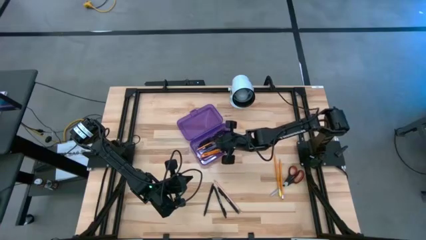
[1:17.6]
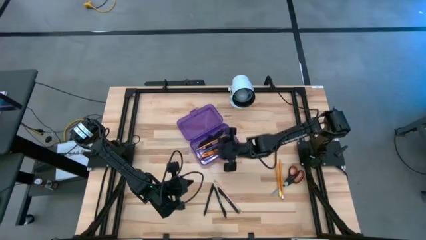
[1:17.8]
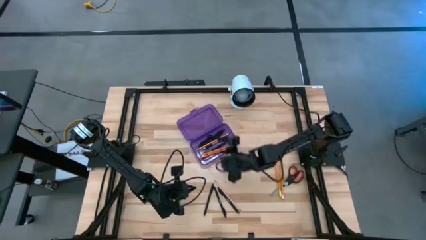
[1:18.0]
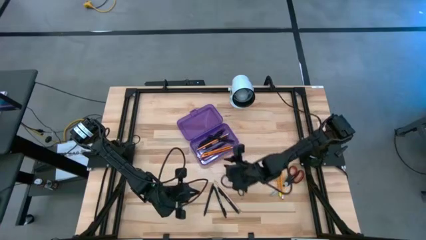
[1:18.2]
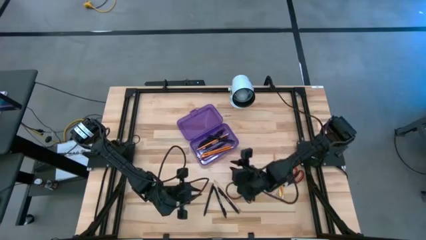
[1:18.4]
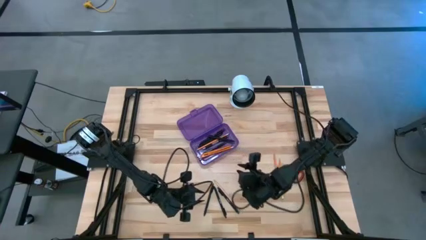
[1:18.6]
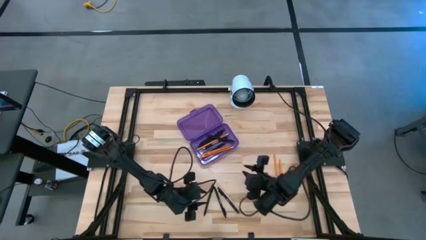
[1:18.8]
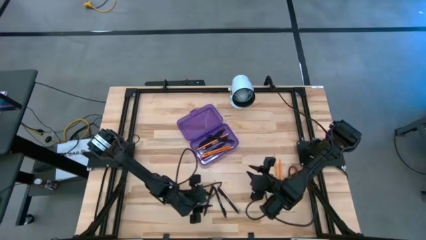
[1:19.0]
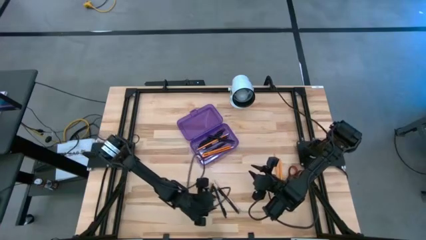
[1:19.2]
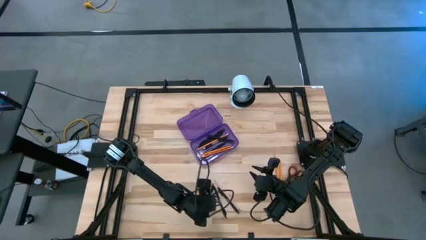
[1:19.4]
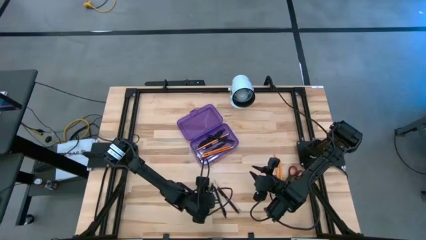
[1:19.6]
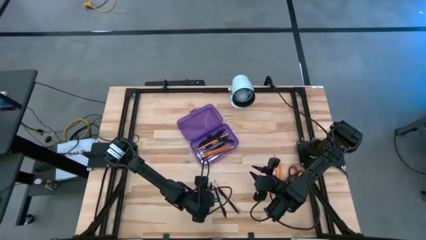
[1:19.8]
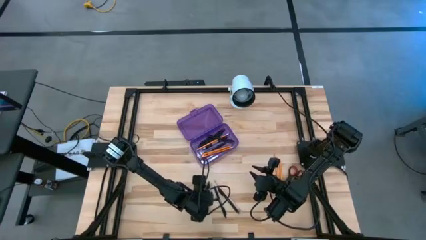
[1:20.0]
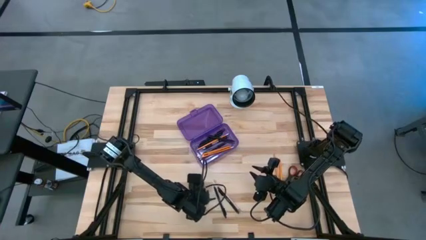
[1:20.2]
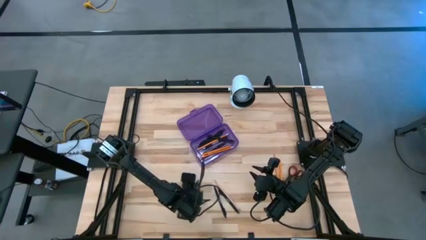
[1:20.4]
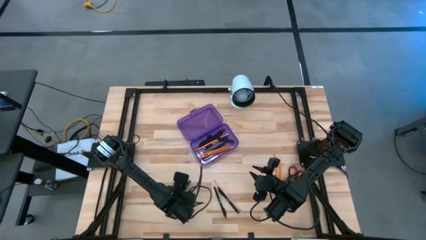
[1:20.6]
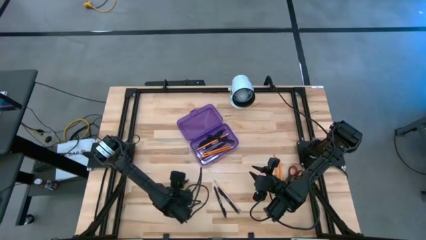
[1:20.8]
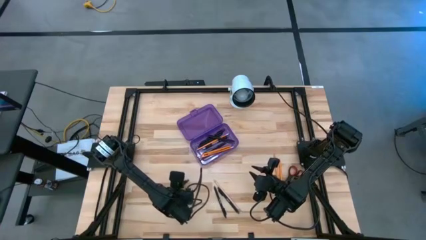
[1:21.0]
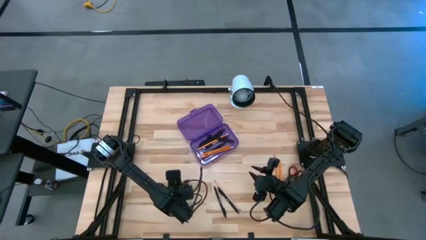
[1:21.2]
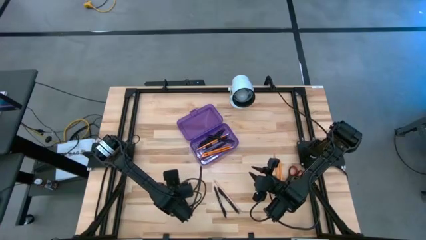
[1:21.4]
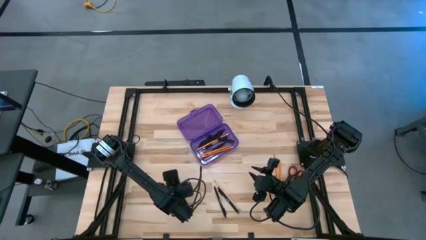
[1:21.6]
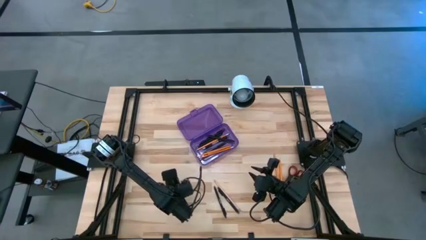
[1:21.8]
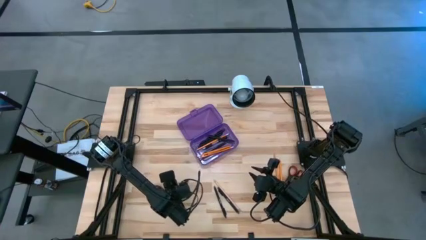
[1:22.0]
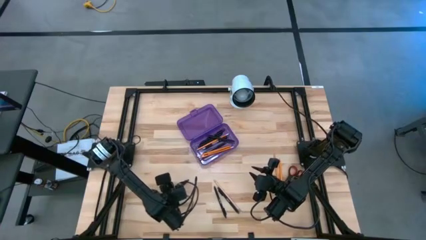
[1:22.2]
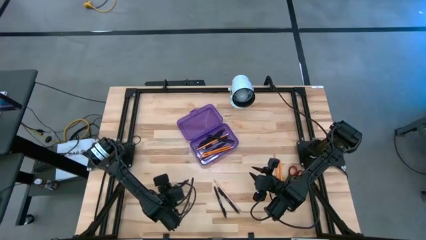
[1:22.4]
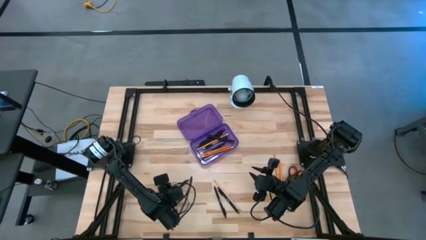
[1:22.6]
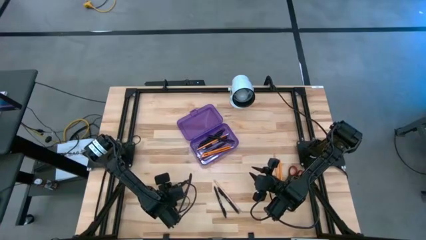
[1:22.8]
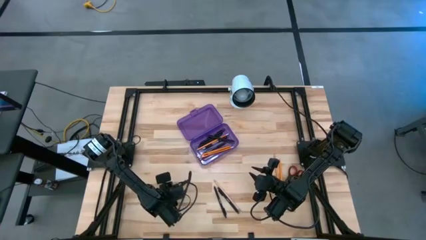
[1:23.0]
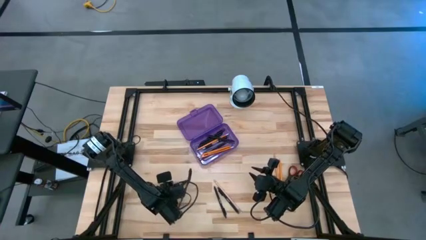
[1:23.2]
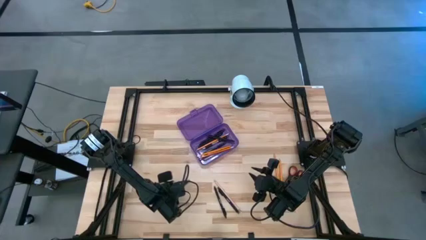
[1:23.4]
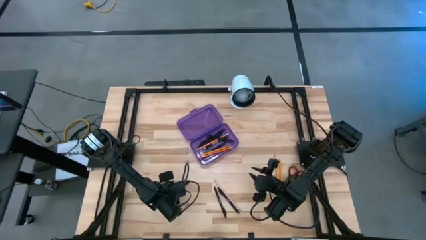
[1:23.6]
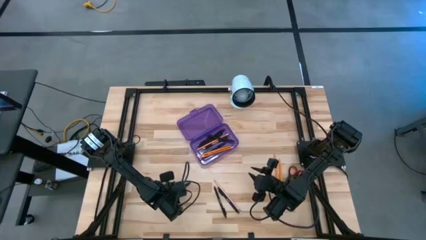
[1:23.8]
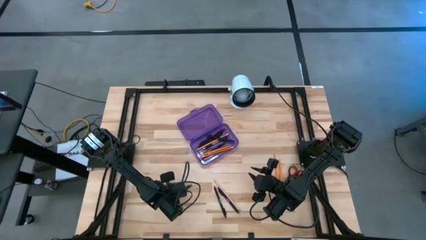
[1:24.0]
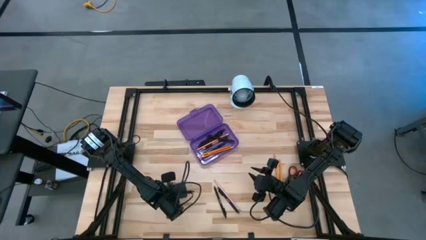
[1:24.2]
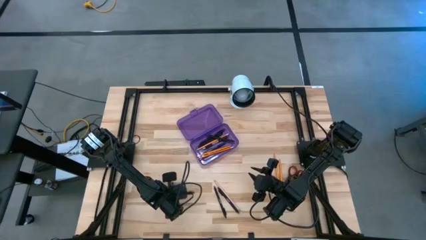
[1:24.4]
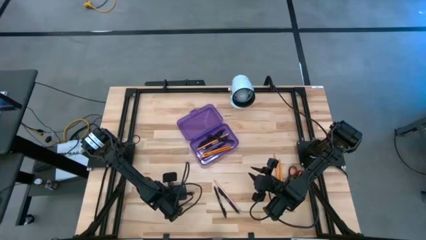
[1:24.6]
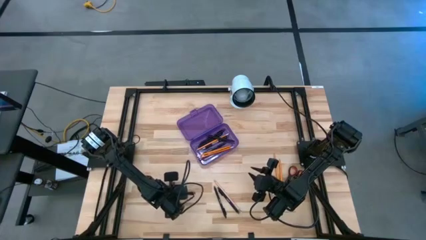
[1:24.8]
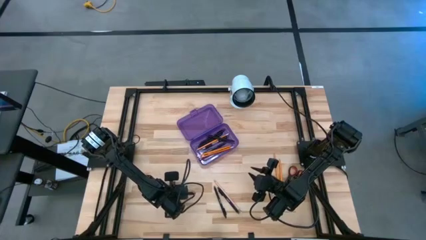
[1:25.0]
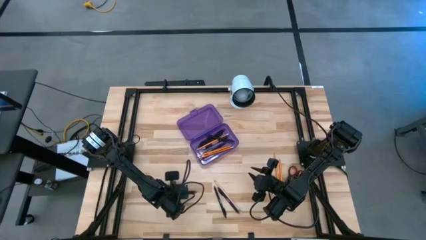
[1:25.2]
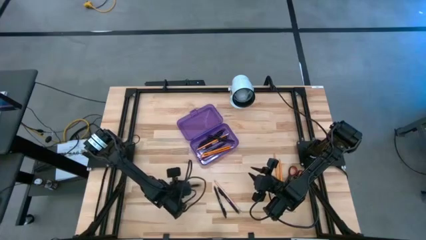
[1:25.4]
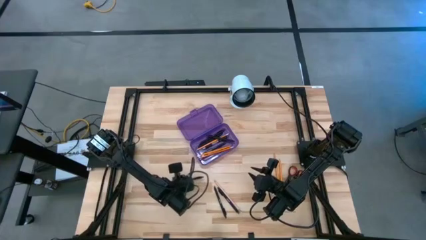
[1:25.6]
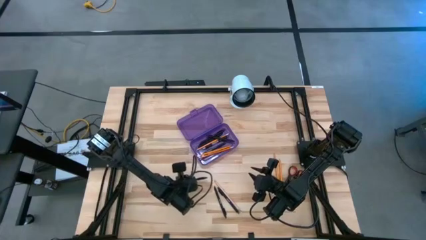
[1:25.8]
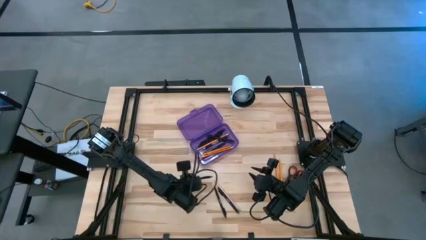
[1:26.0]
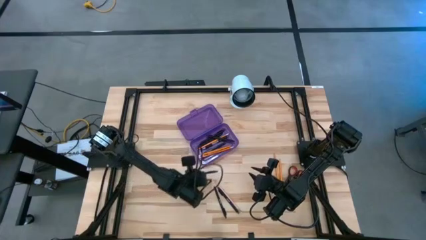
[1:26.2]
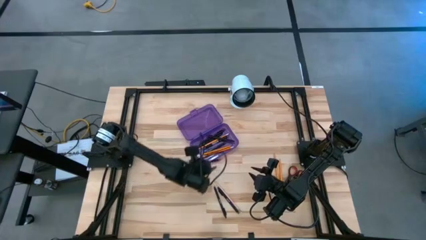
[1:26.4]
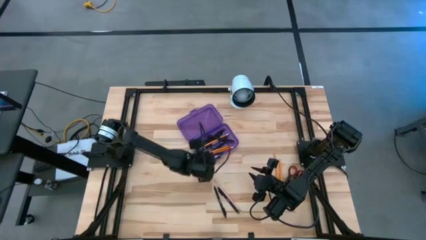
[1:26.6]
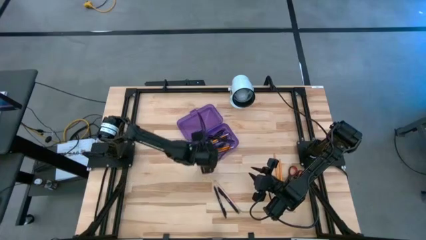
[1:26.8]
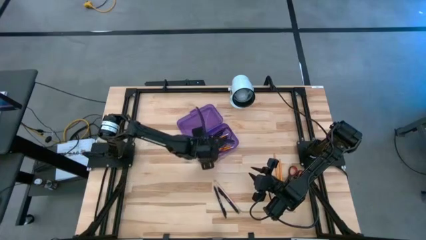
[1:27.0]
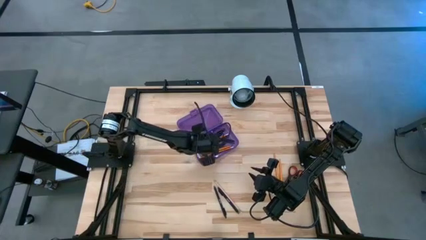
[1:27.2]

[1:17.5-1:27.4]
Task: Pick & place school supplies into a supply box
Put the black pen into the purple supply box

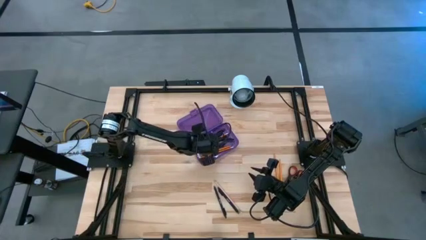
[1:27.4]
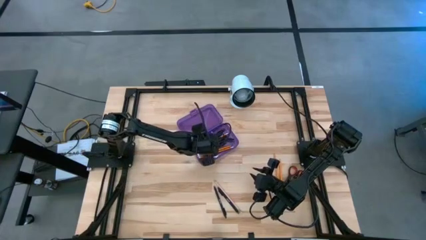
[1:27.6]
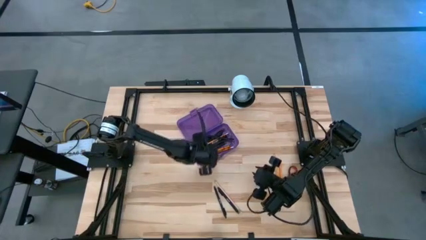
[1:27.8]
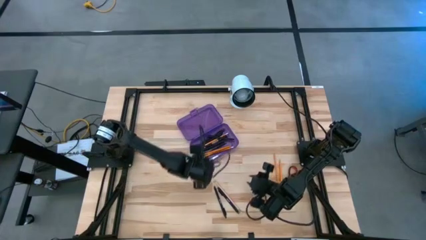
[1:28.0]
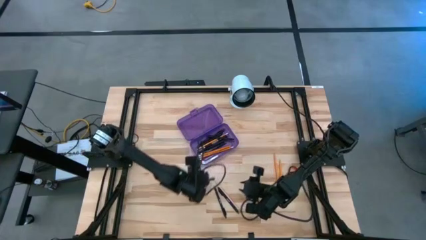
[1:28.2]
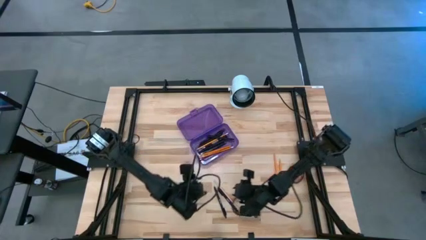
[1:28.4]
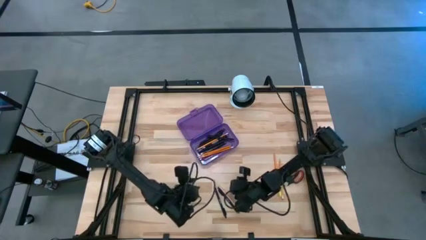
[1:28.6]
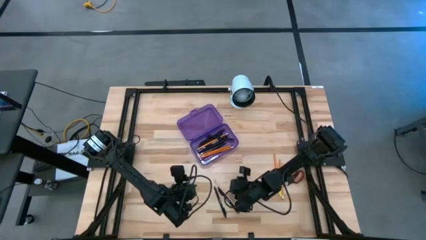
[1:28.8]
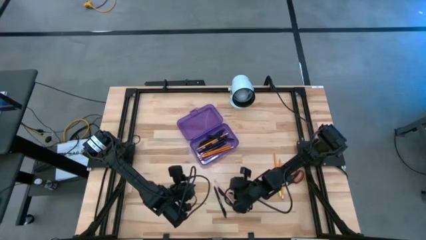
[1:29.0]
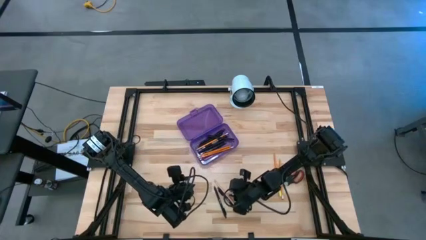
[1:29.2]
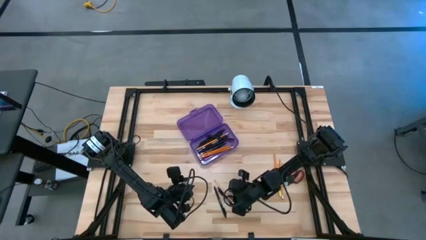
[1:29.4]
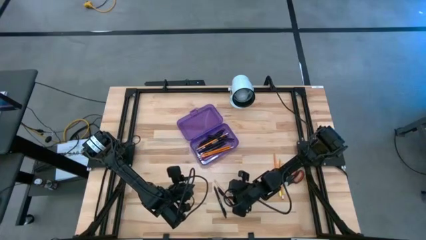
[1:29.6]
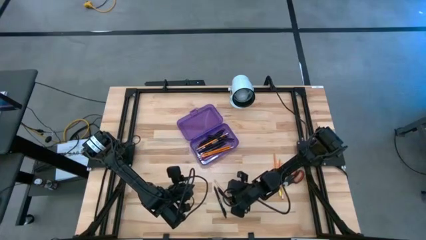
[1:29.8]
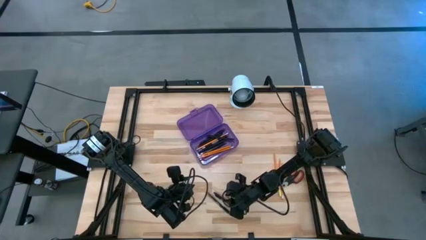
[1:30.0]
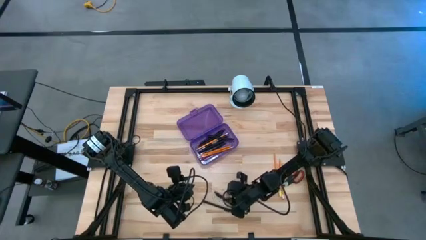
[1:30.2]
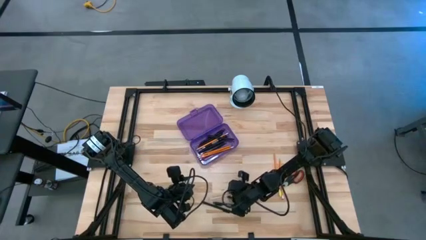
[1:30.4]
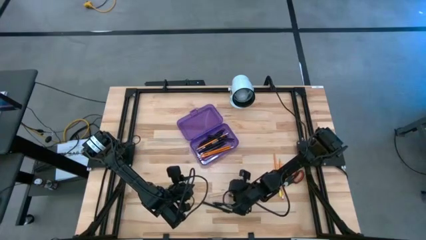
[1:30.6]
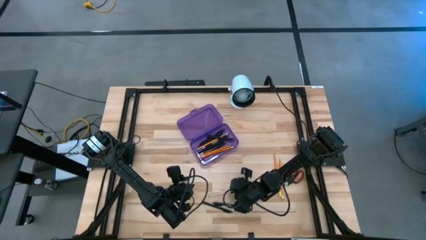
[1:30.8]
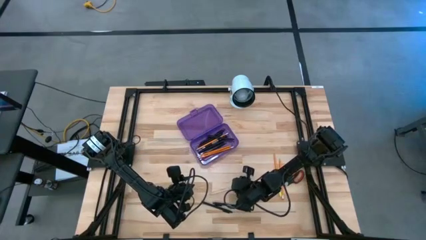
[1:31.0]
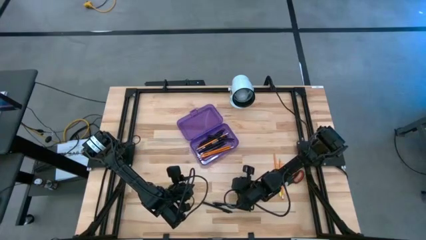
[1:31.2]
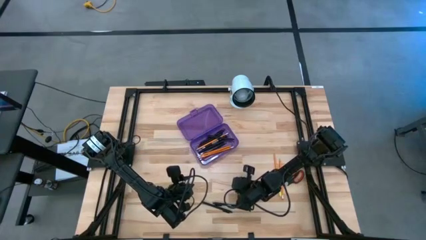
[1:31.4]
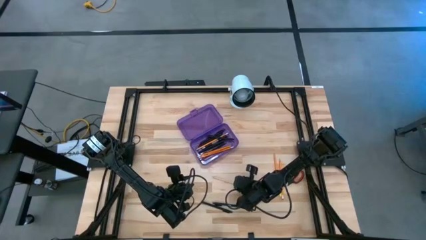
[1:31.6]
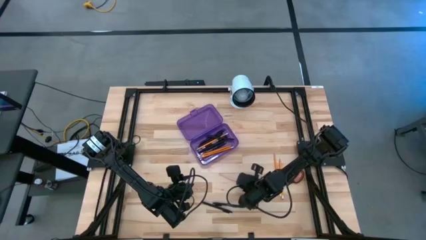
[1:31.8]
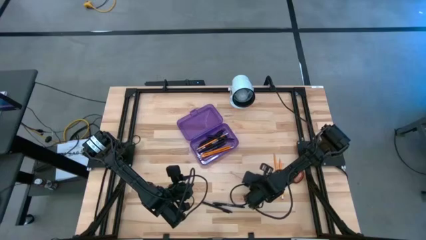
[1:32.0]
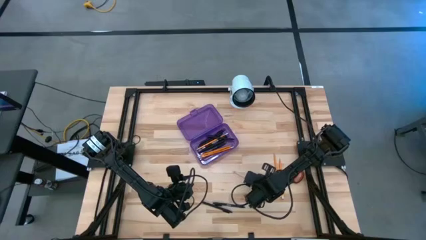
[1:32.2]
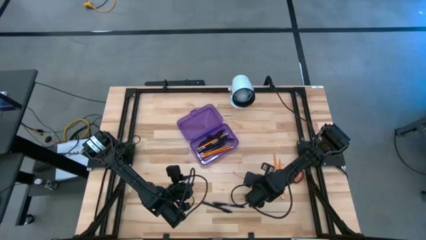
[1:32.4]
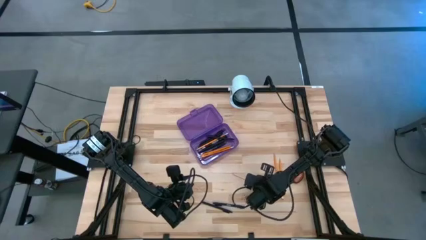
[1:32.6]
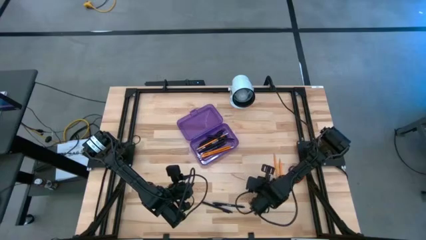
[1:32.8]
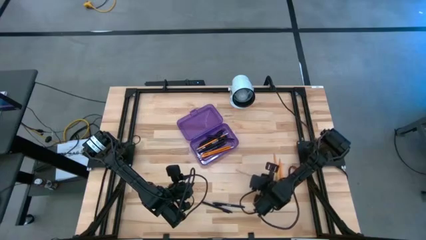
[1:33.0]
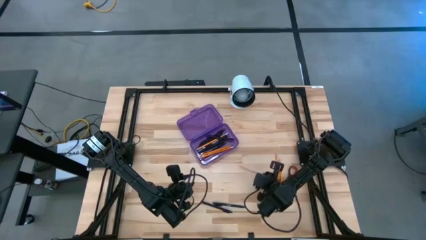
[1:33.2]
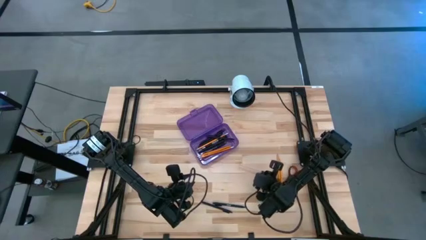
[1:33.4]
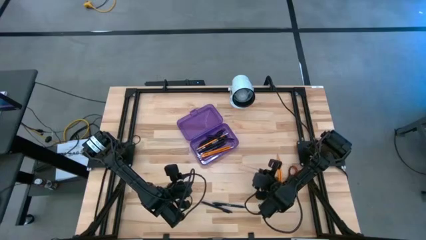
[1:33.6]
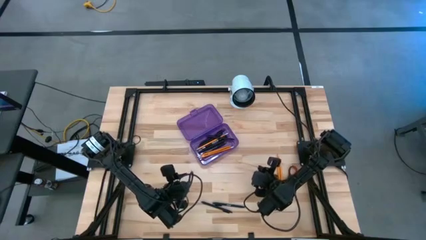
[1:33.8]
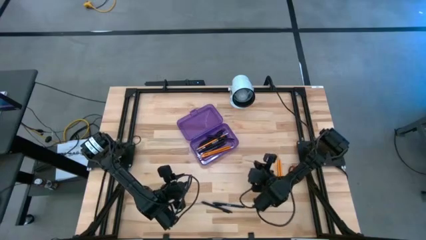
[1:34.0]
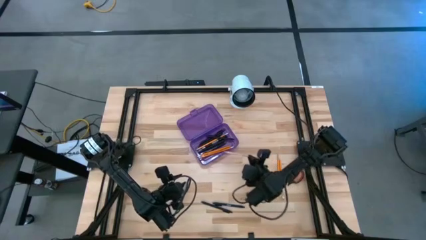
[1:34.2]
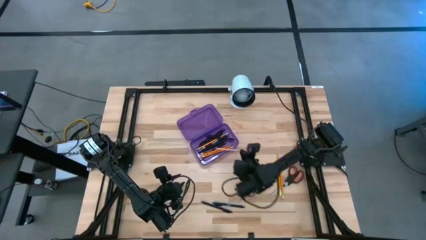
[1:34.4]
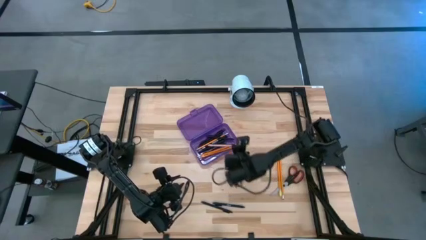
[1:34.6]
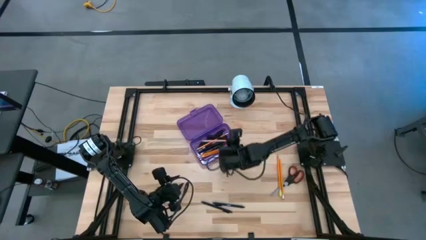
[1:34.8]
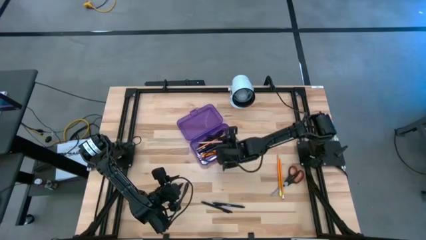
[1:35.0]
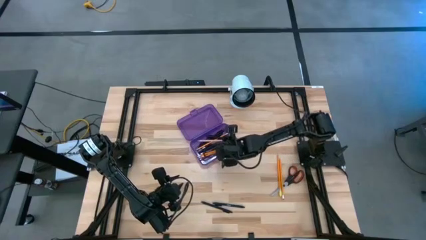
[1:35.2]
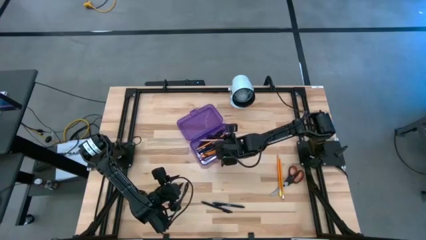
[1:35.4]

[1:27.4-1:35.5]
Put the light pink pencil into the purple supply box
